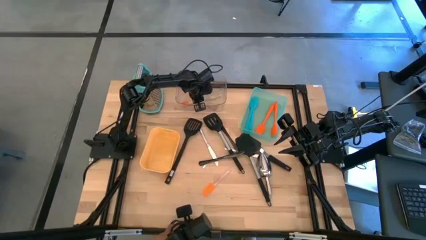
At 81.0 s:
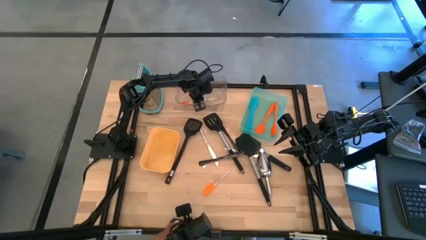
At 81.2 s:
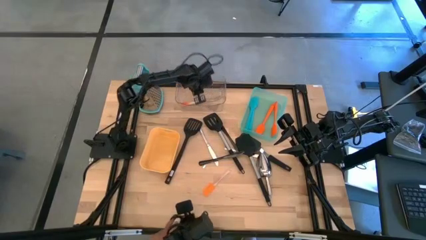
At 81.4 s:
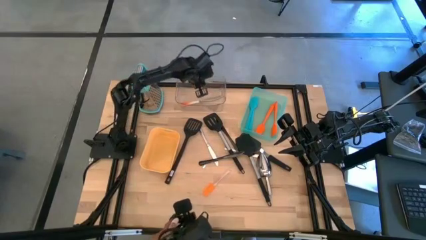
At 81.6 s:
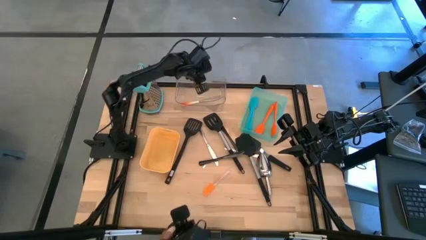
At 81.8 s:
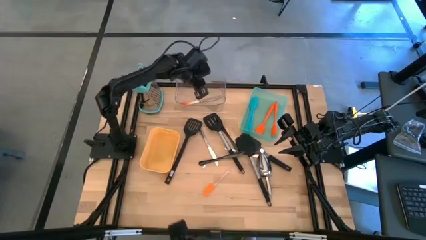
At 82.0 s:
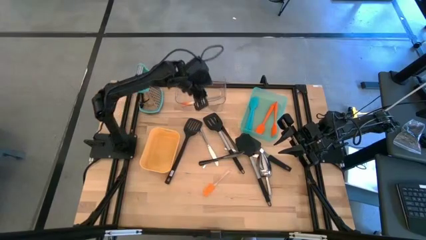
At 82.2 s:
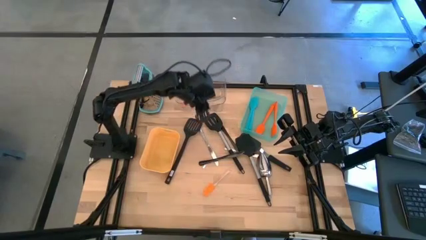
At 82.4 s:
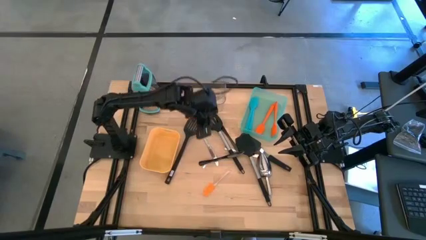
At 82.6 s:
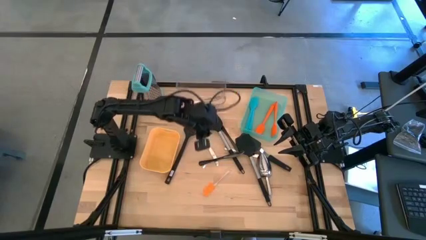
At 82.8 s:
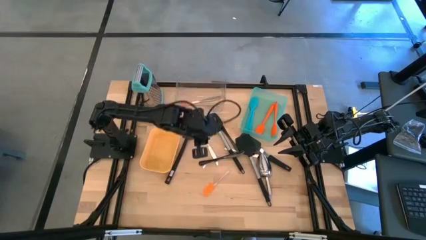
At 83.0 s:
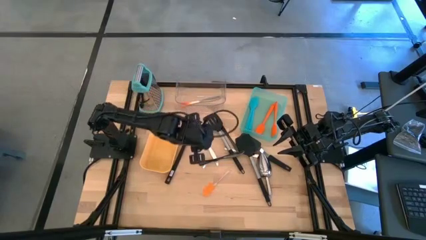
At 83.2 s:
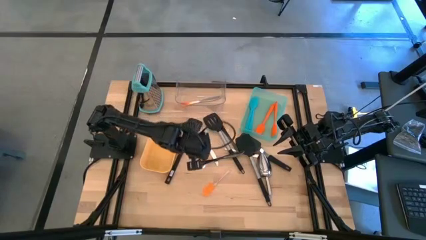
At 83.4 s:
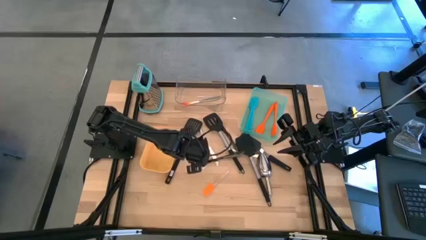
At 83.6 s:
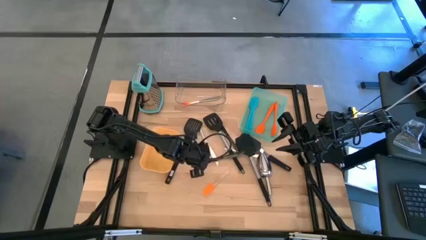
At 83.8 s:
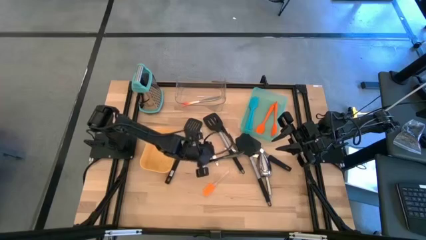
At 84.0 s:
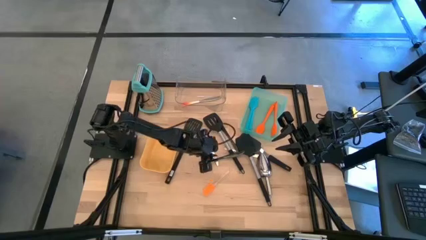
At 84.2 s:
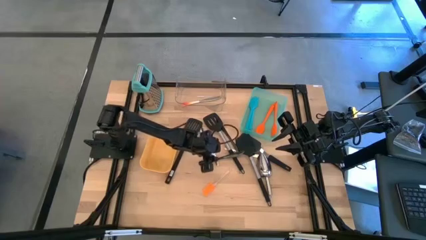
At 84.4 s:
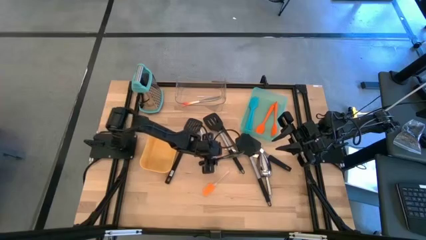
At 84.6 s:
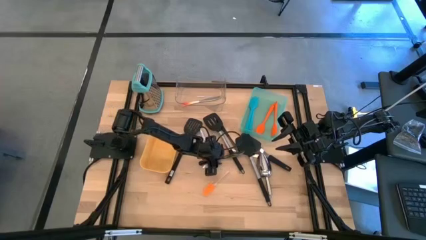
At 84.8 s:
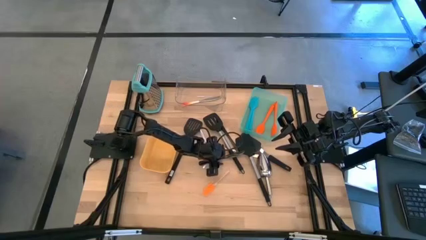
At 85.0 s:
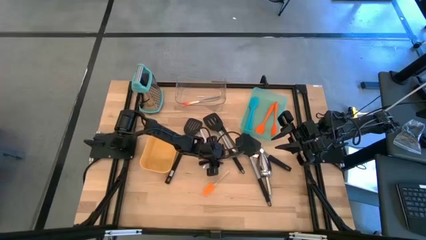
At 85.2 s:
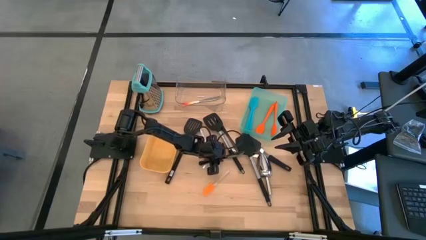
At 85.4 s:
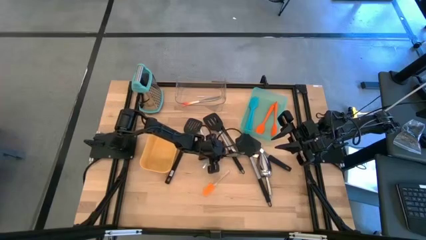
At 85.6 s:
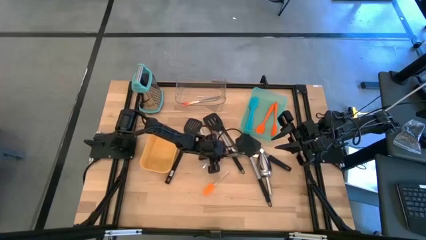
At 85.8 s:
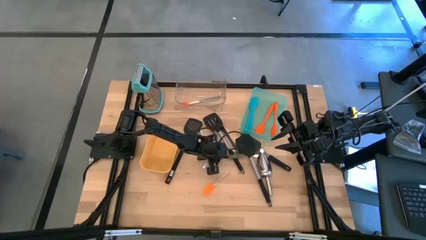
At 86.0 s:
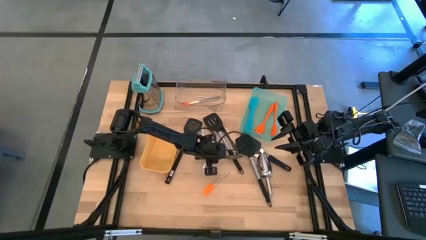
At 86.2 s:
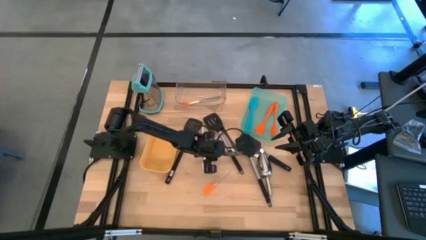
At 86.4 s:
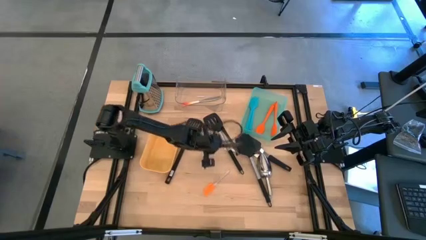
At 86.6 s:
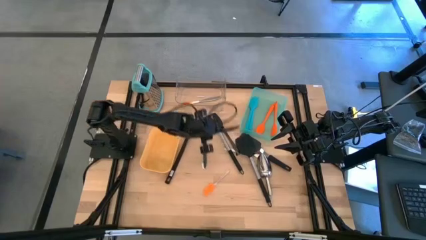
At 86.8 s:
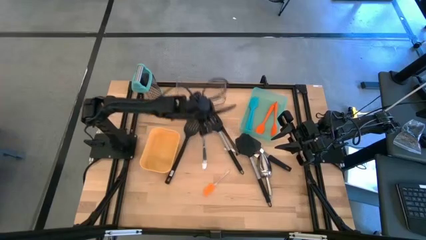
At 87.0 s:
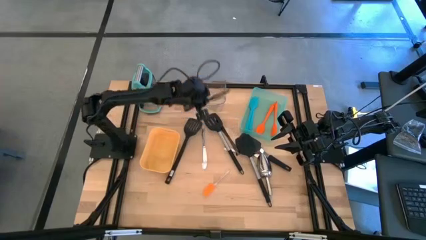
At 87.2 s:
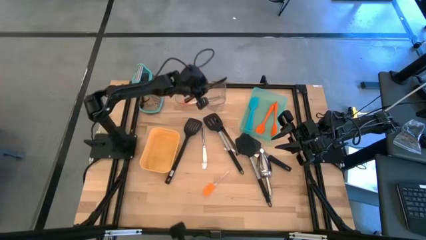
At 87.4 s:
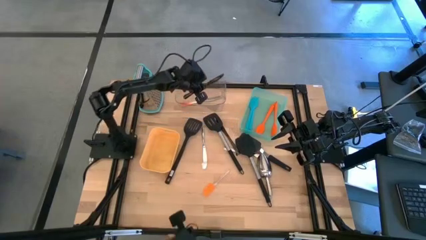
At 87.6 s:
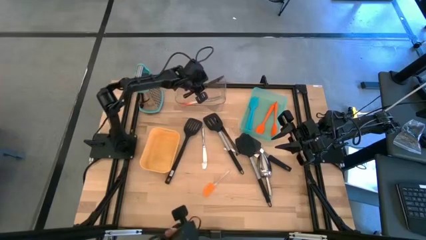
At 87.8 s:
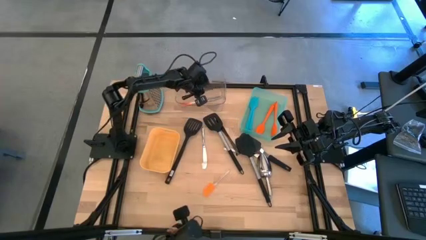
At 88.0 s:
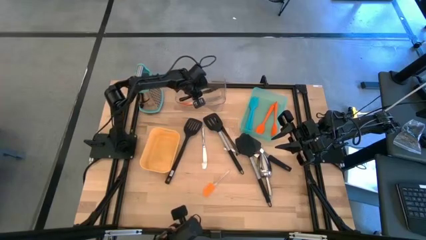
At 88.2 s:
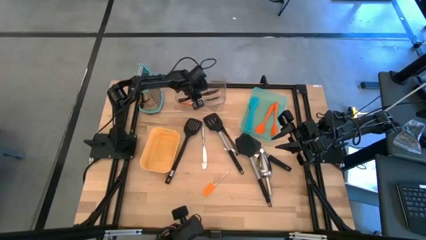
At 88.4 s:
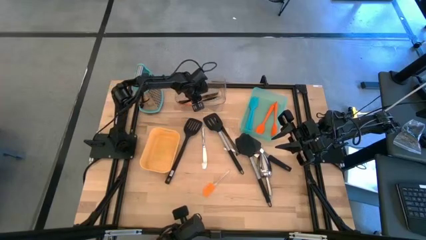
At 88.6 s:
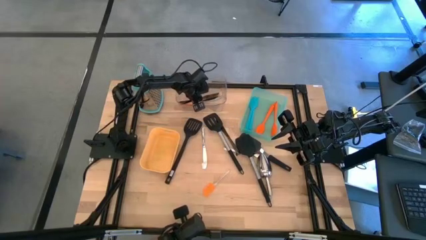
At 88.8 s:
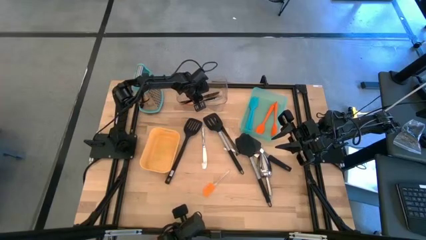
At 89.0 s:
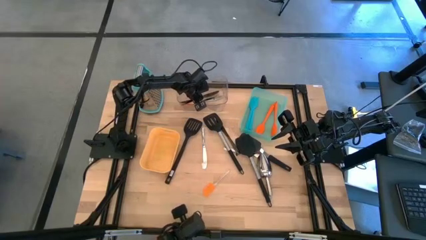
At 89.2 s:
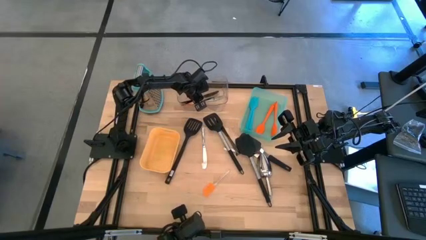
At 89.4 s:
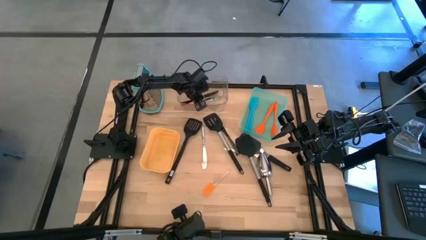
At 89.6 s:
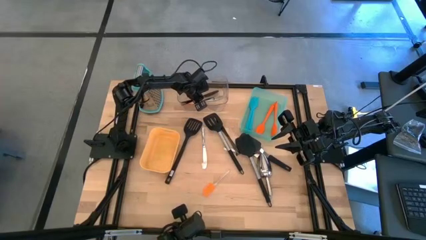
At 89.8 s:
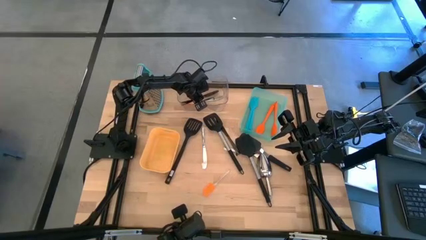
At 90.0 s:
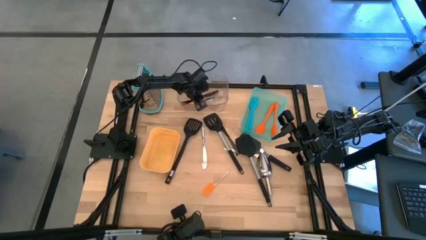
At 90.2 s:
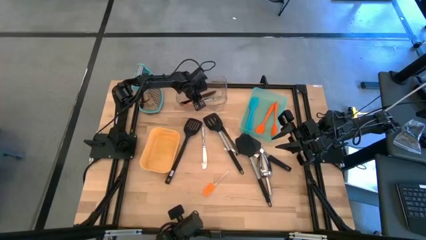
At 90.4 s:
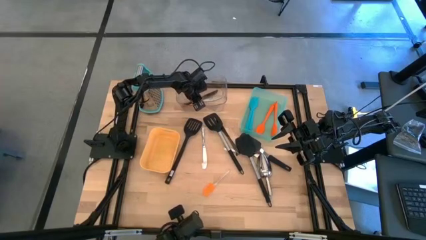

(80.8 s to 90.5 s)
Task: Pick & Place Kitchen Items
Put the black table knife into the transparent bin

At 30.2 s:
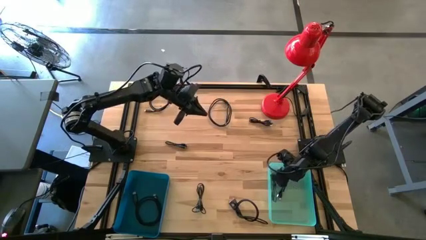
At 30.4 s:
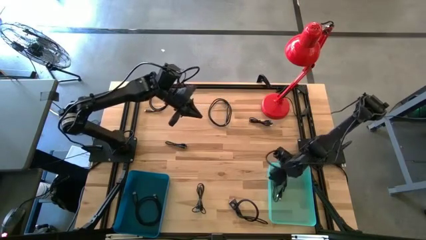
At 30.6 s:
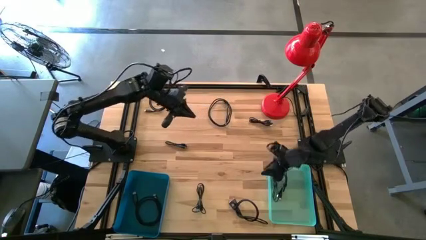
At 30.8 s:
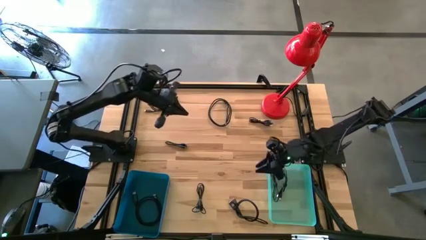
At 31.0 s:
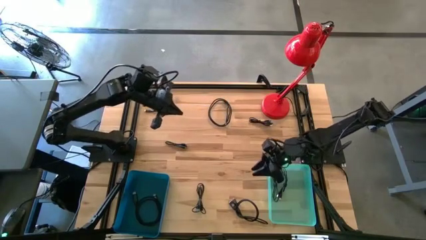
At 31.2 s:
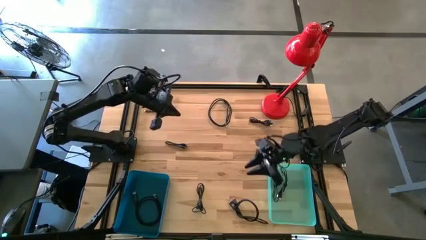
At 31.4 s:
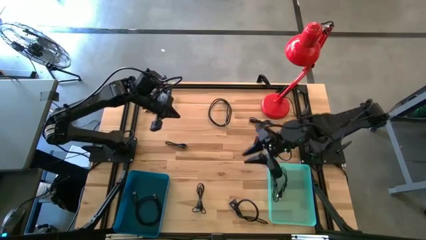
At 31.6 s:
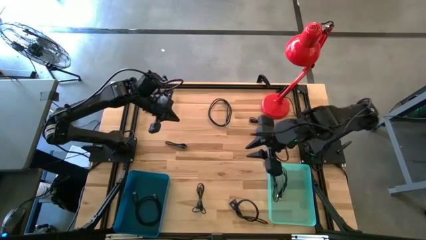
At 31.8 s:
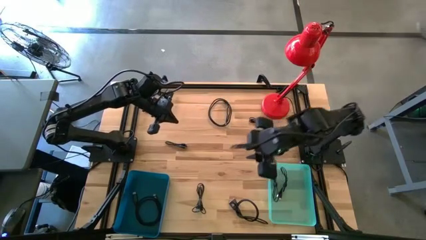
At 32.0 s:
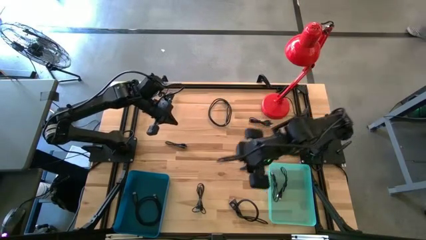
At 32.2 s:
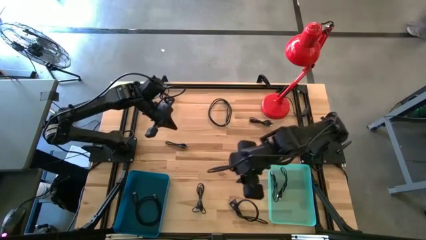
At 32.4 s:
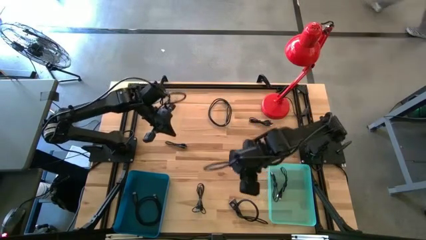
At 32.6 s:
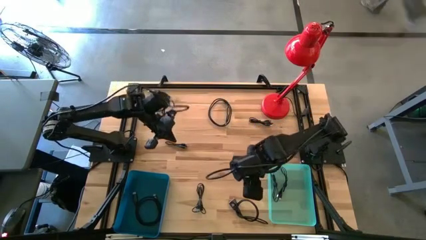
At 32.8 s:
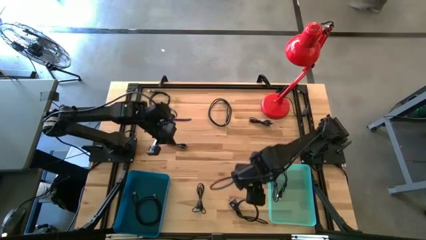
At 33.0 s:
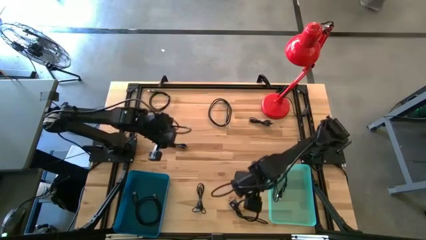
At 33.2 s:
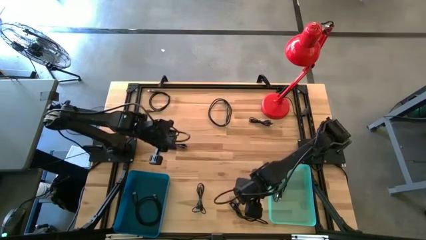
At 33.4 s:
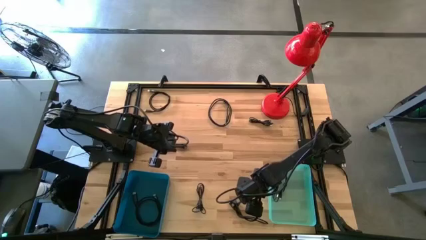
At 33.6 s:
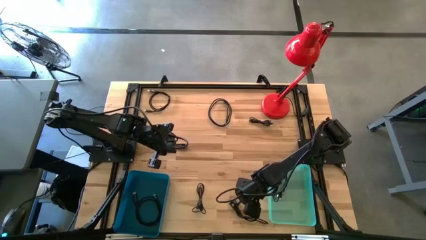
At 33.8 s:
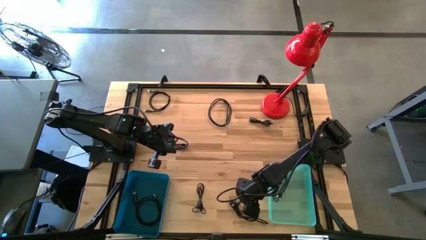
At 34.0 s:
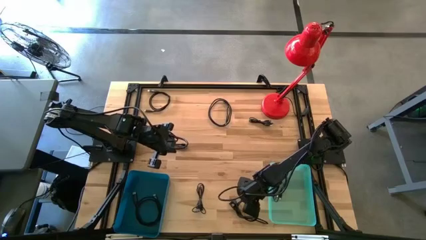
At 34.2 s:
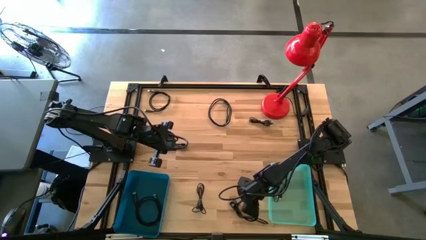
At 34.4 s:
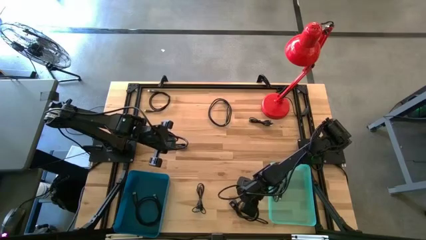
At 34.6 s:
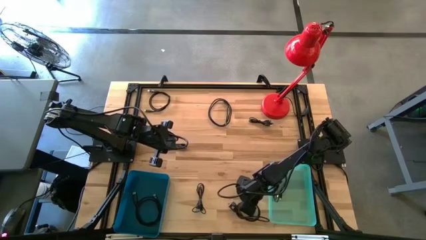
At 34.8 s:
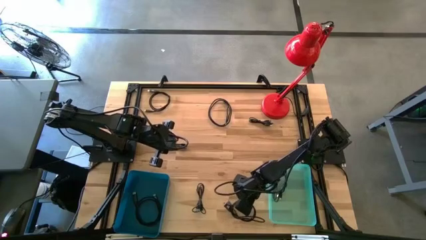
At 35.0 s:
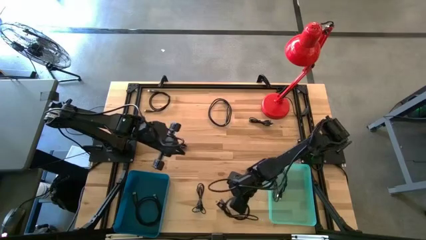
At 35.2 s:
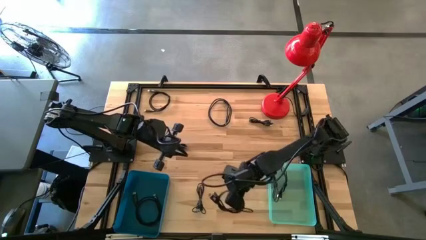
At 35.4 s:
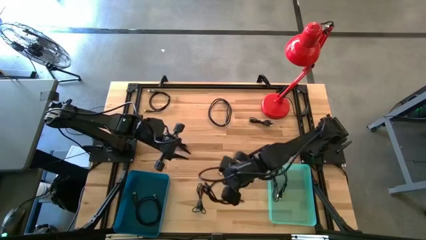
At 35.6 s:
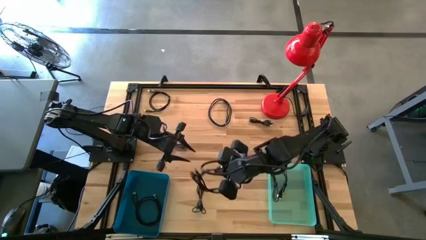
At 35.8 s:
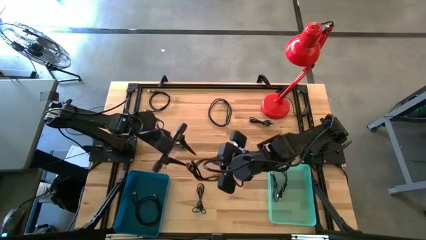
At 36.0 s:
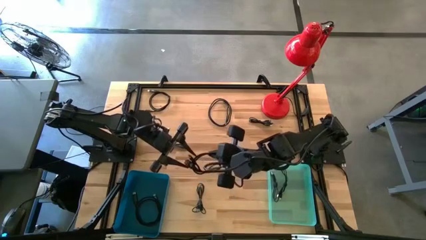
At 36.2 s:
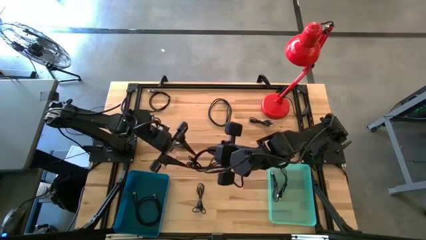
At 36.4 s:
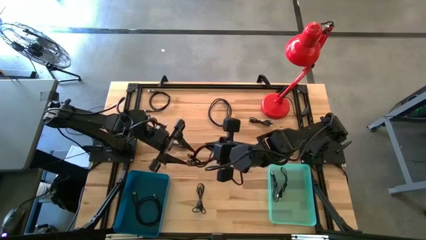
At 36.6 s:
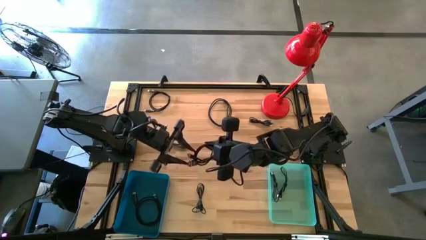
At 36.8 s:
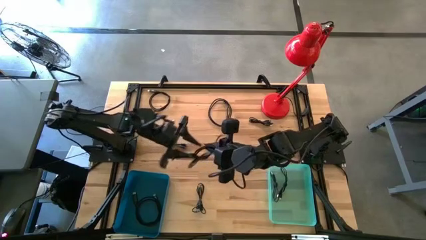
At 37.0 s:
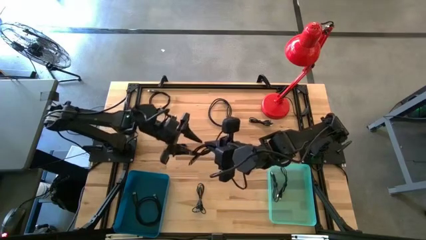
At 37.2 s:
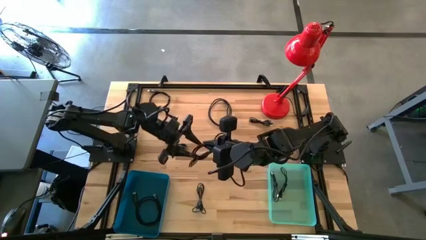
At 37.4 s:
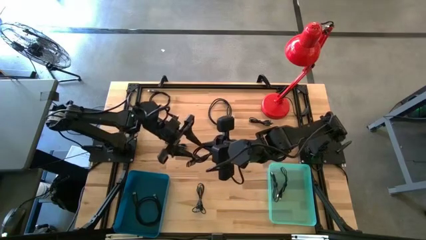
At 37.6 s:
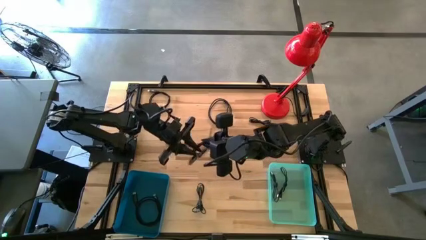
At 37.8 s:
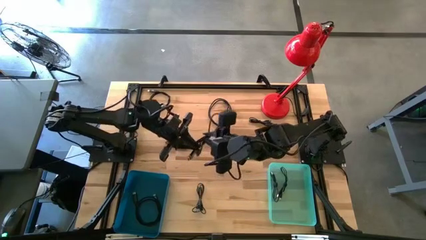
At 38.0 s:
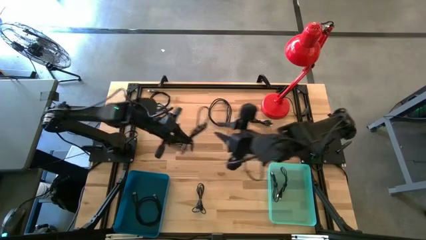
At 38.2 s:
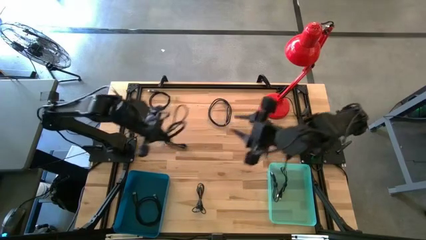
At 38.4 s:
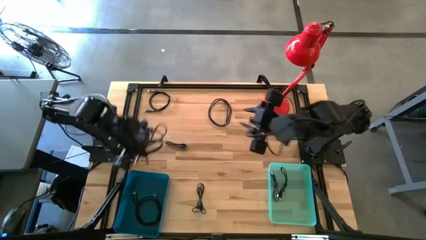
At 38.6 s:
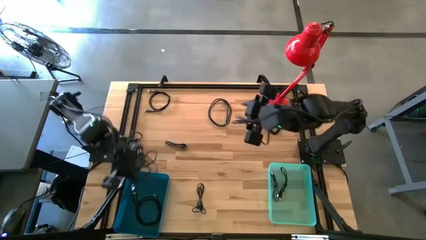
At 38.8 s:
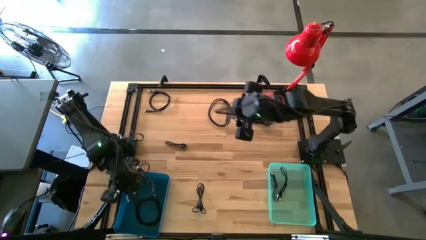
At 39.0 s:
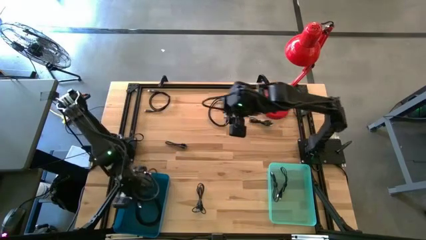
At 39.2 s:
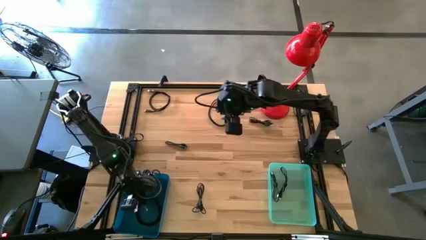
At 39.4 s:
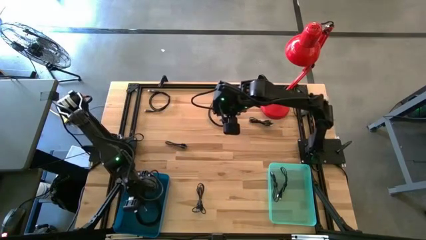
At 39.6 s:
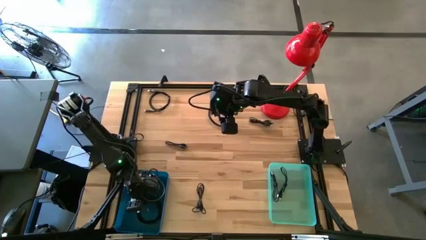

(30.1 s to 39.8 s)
Task: Pick & Place USB Port
Put the black USB cable into the dark blue bin
